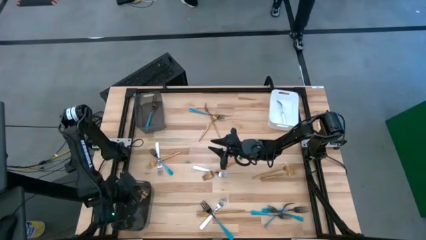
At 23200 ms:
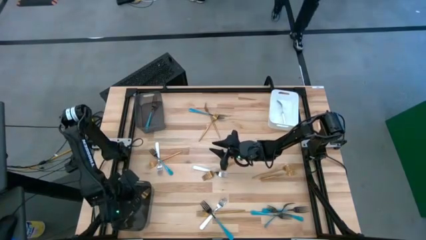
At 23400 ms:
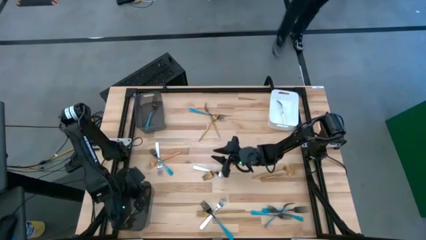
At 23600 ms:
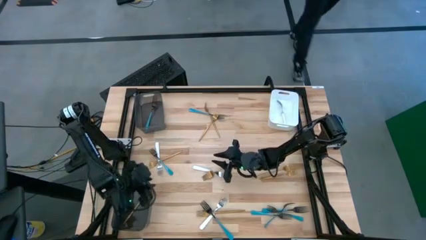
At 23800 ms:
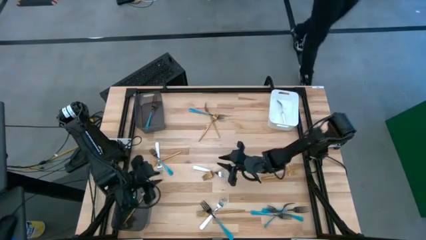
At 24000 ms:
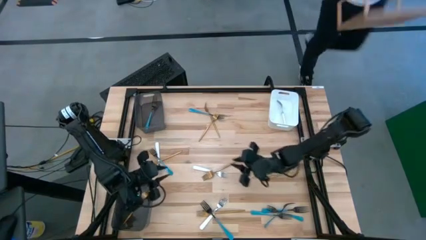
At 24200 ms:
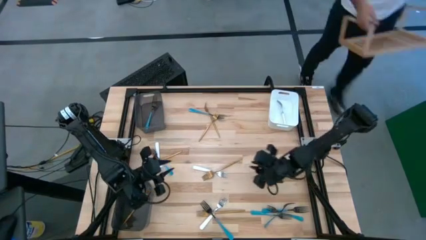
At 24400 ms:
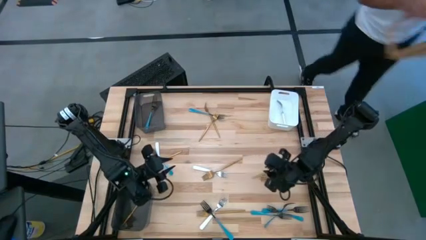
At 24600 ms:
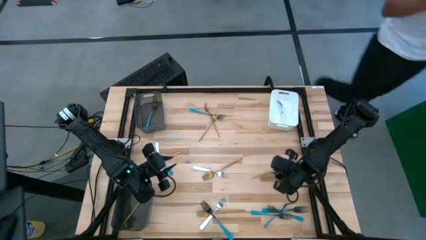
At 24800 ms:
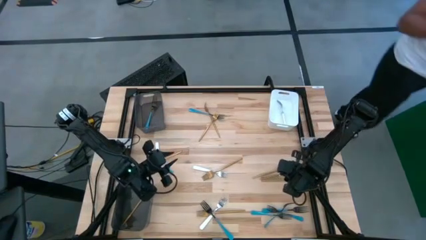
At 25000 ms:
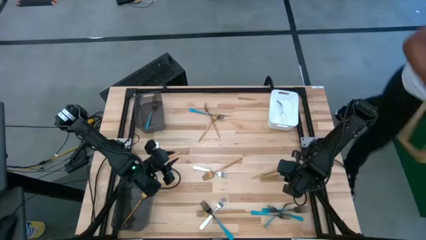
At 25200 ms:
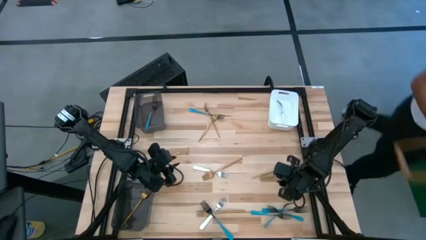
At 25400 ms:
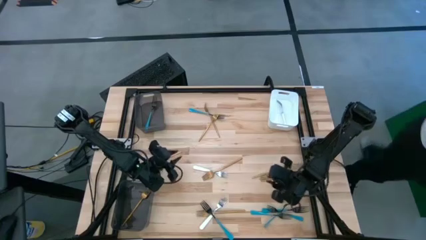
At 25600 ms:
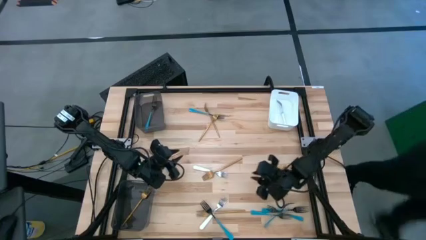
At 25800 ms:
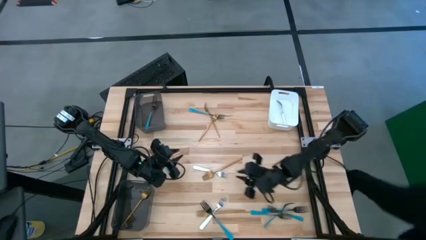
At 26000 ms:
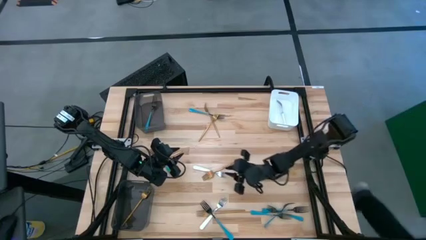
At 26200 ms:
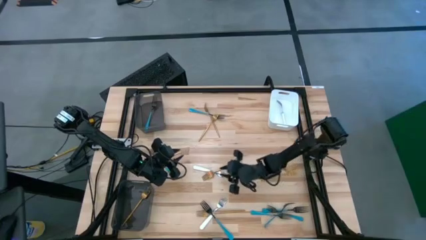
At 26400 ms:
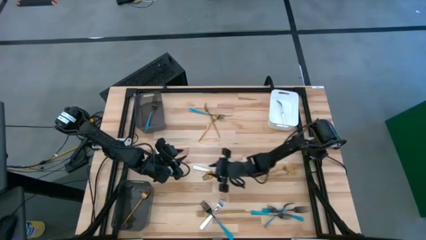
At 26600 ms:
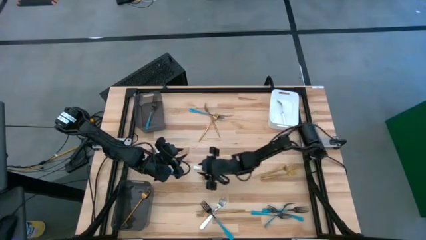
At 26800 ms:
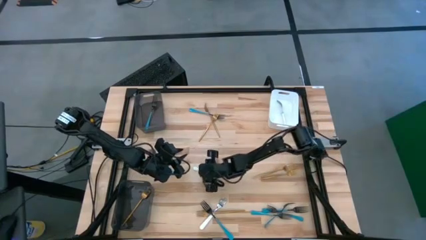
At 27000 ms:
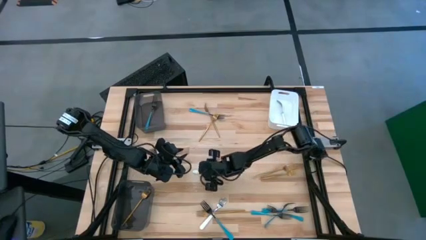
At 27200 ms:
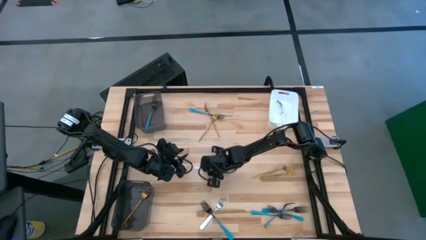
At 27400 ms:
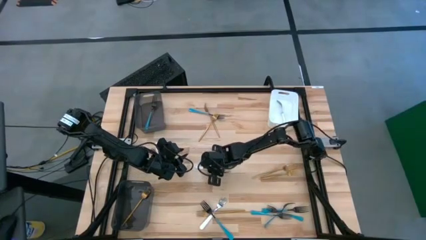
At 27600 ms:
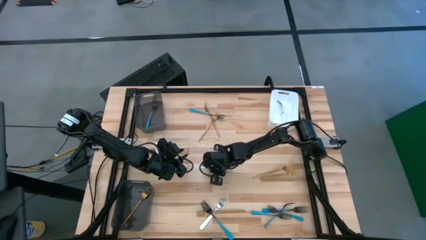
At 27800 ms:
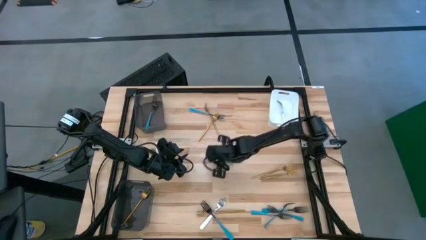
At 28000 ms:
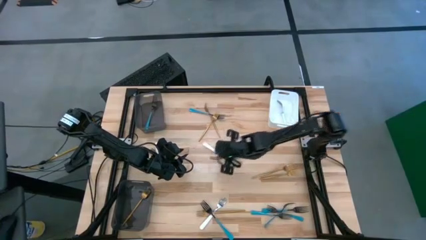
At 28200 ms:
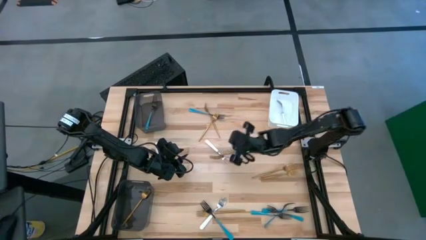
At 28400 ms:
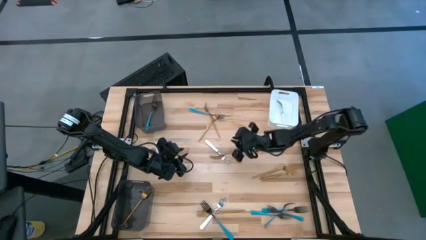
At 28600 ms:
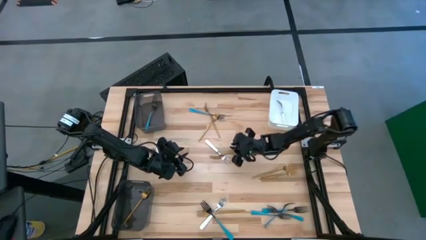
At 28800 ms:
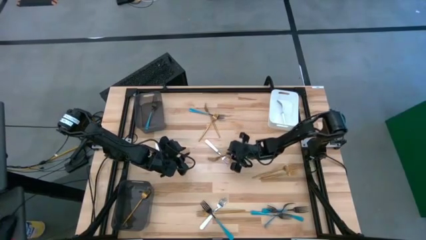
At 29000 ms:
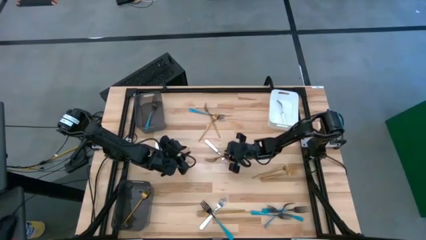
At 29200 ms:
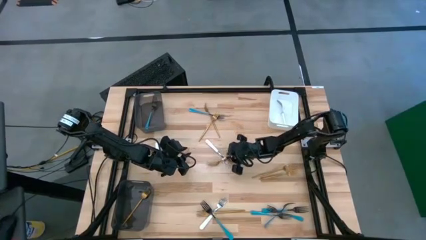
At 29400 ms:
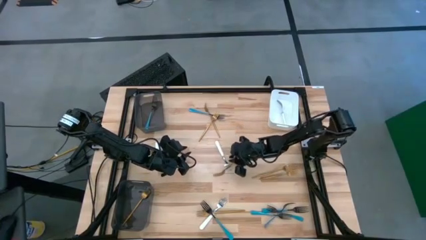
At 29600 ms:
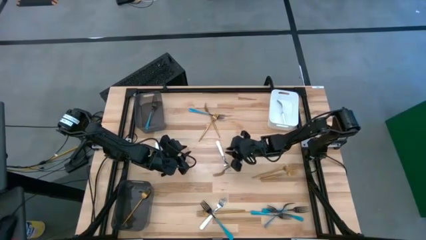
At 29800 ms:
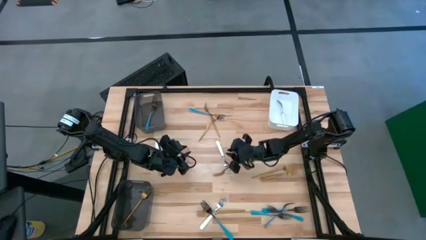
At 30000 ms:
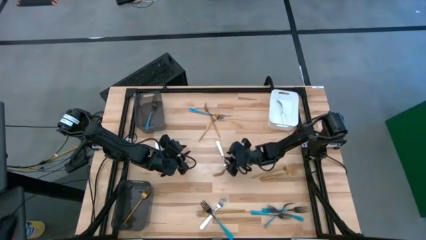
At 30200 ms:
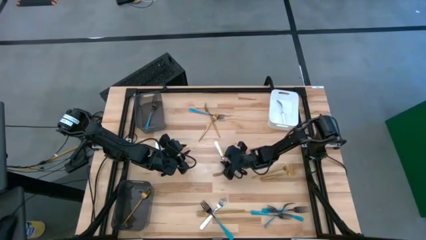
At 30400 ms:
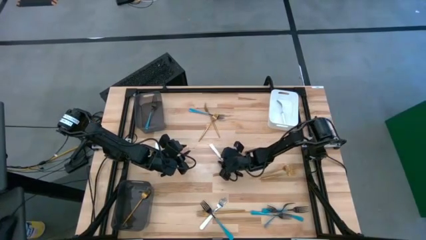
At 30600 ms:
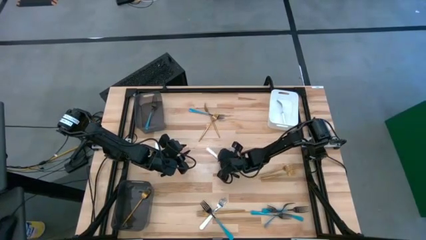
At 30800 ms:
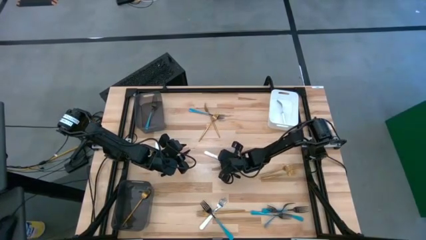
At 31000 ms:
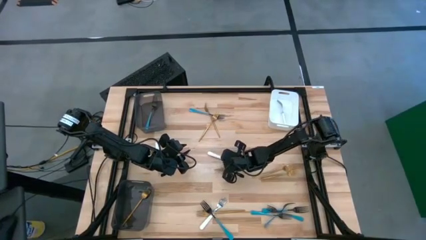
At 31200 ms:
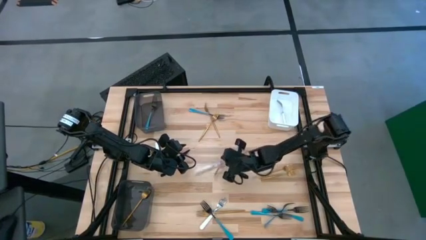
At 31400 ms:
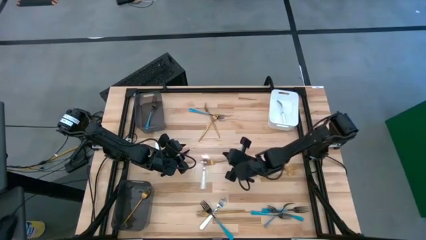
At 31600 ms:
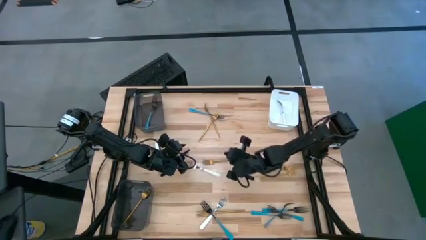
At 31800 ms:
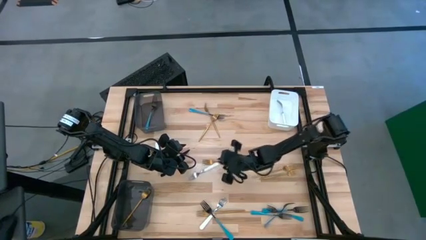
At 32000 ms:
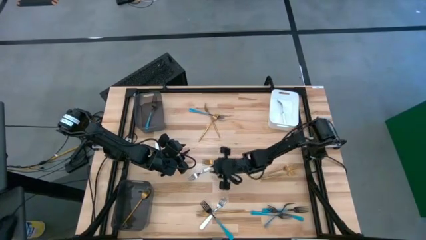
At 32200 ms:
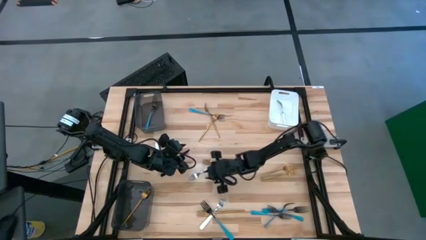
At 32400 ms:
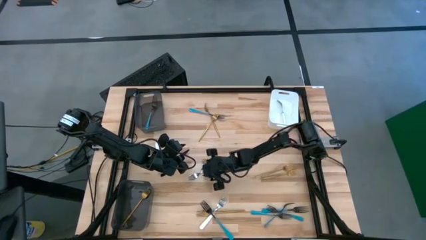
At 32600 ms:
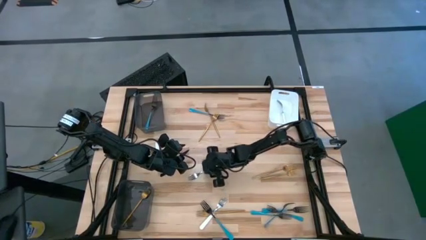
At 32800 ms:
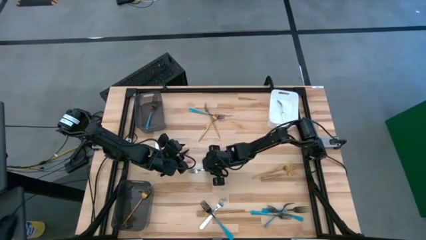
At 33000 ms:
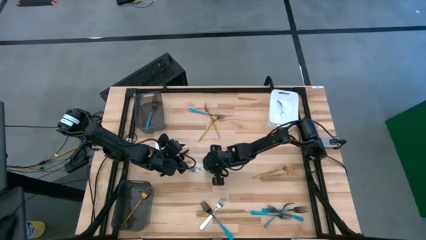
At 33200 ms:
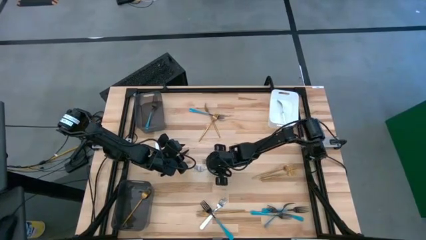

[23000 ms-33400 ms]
Task: Sort silverware by color (type)
Put the white fork into the white bin

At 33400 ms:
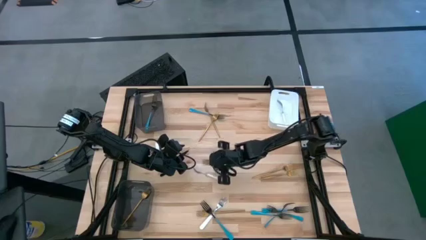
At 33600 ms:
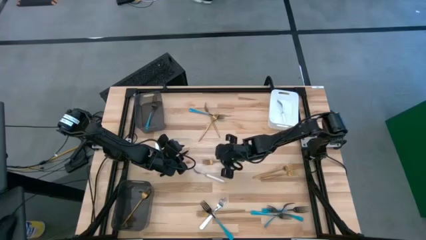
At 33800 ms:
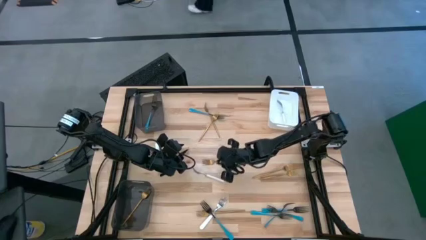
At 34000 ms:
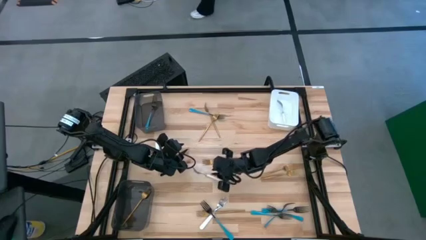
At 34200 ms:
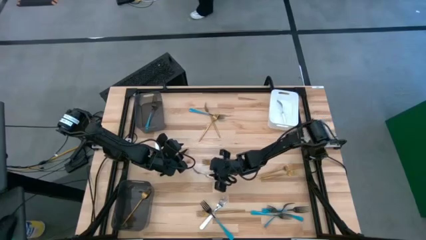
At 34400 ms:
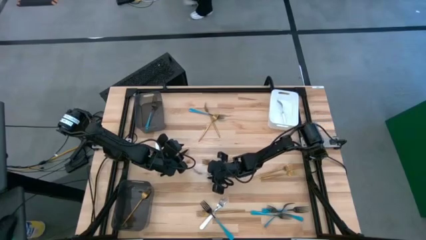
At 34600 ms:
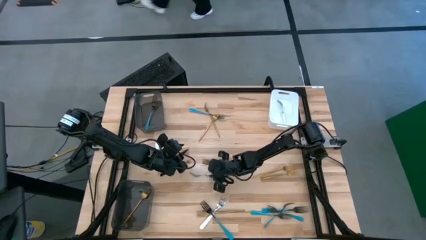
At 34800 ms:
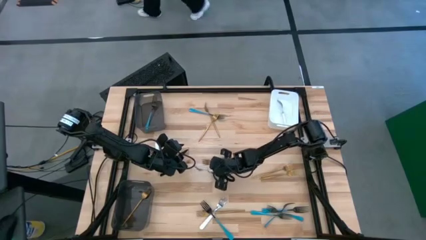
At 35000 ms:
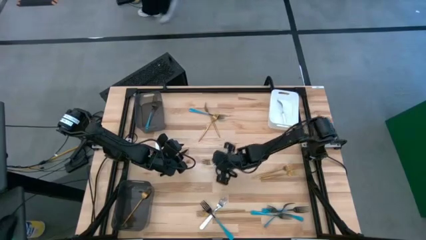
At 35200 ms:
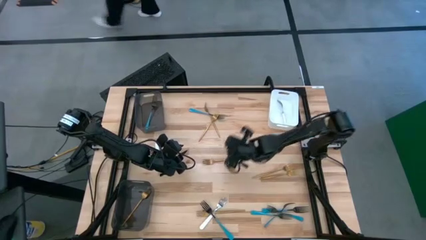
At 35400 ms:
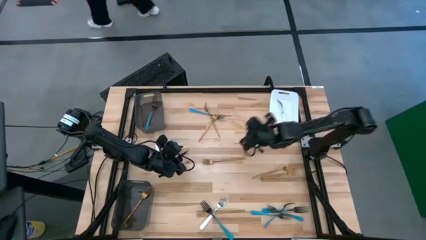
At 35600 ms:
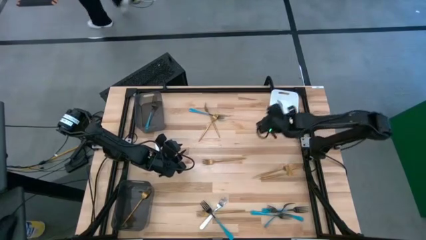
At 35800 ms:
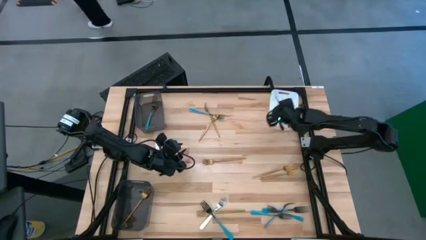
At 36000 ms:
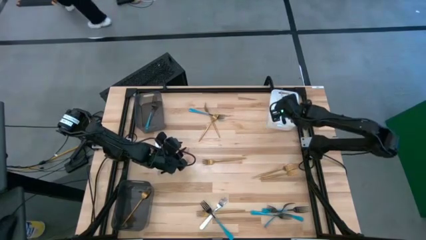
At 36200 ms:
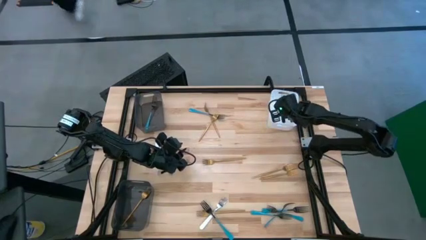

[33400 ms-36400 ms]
Put the white fork into the white bin

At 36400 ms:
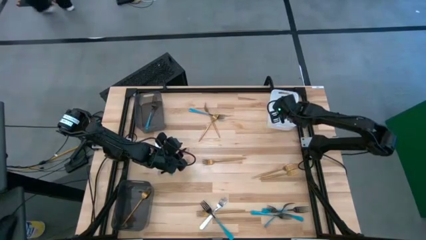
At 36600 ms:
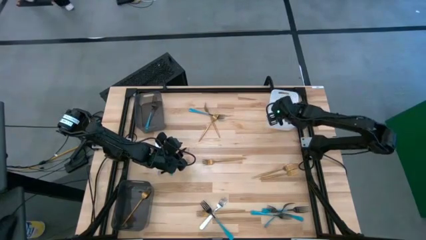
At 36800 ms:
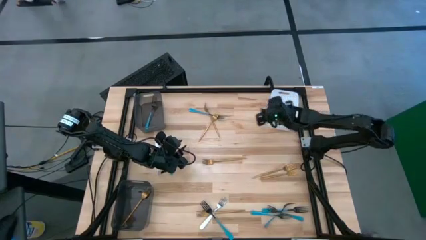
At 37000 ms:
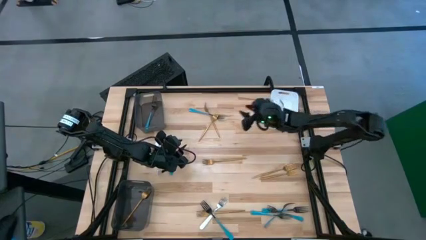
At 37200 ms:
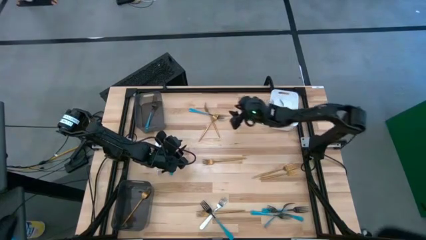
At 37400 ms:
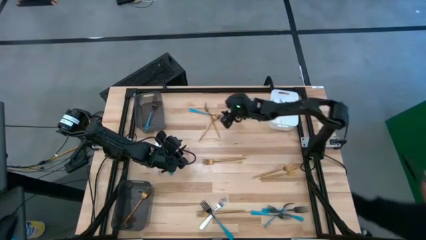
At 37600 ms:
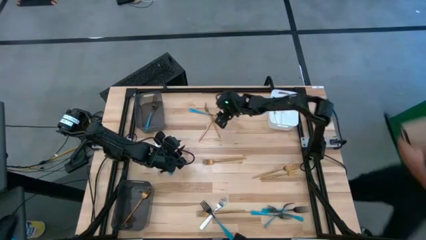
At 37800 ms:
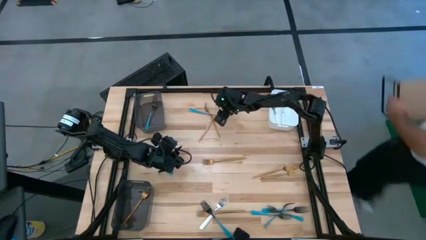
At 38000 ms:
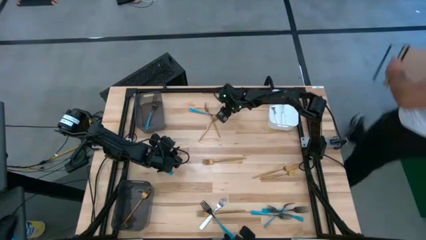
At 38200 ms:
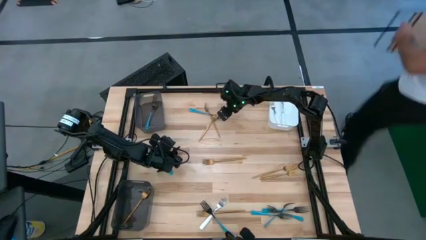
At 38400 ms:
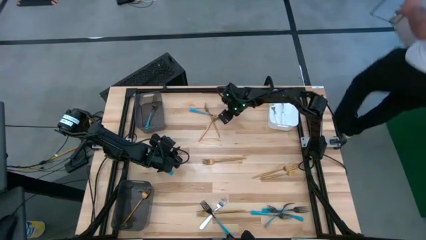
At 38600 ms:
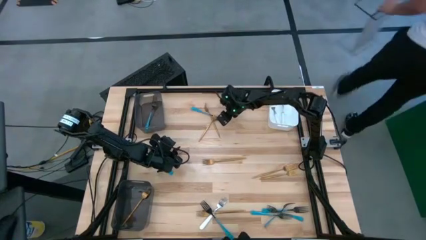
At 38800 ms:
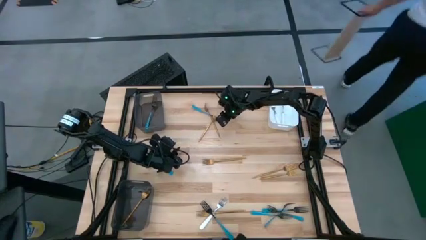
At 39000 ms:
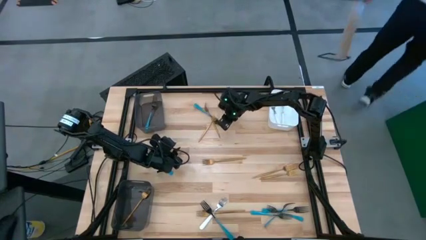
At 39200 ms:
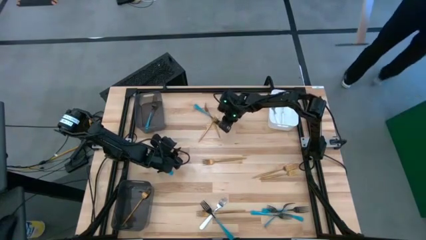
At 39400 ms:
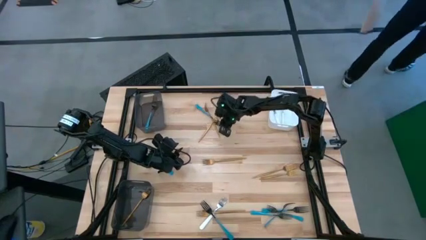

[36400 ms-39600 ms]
Put the blue fork into the top black bin
